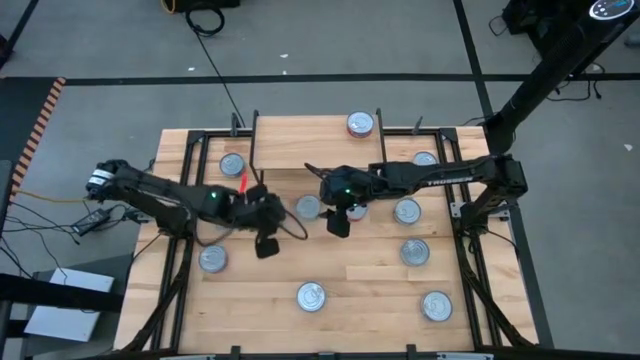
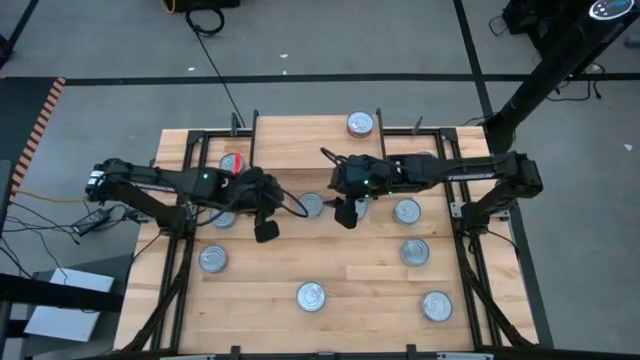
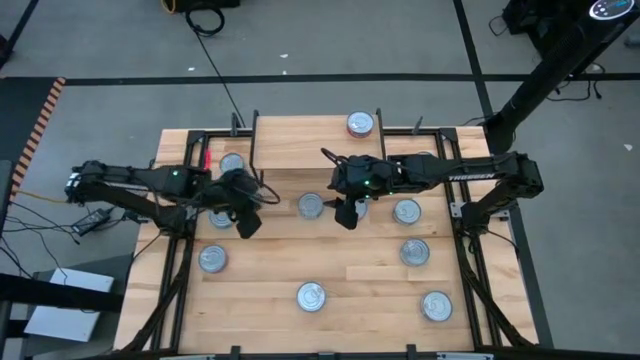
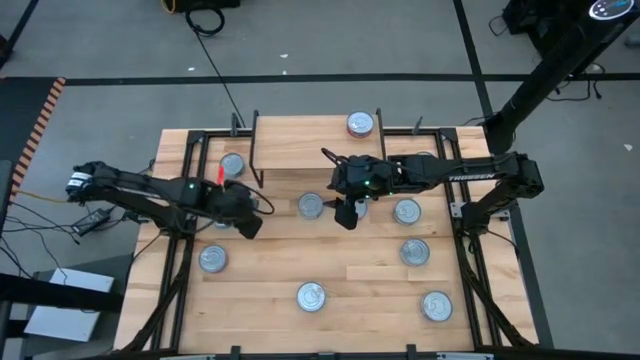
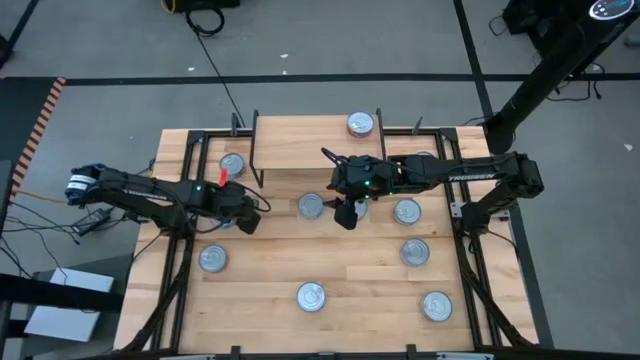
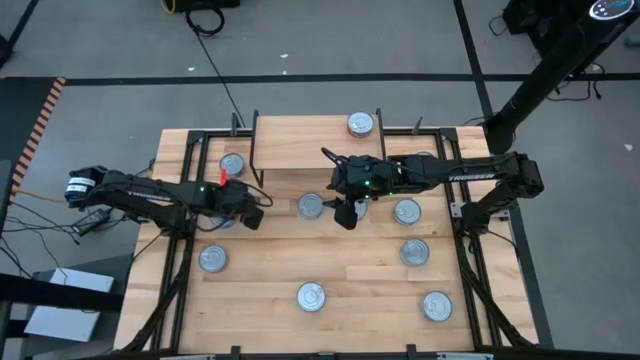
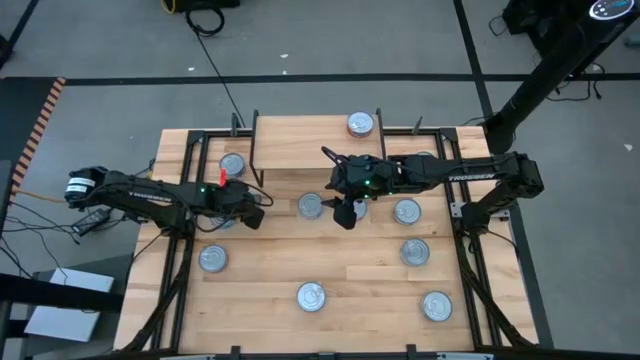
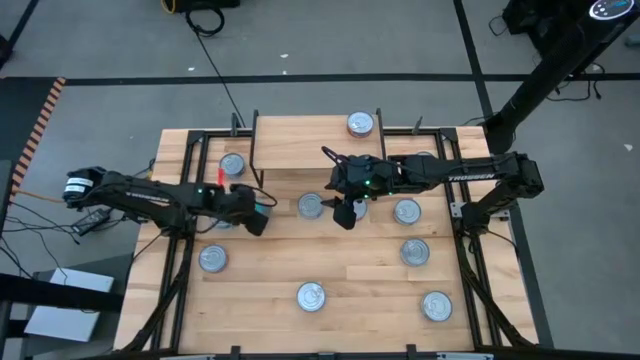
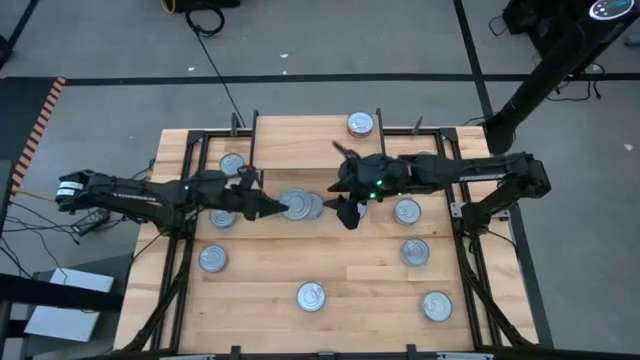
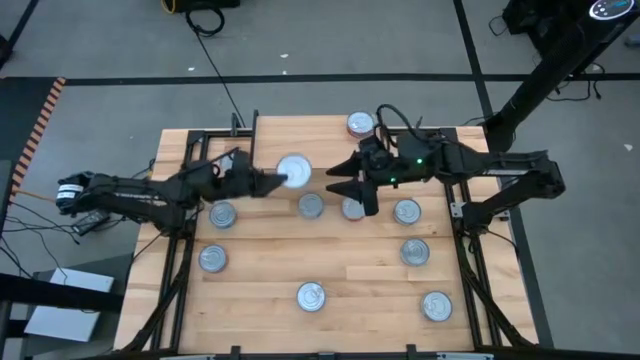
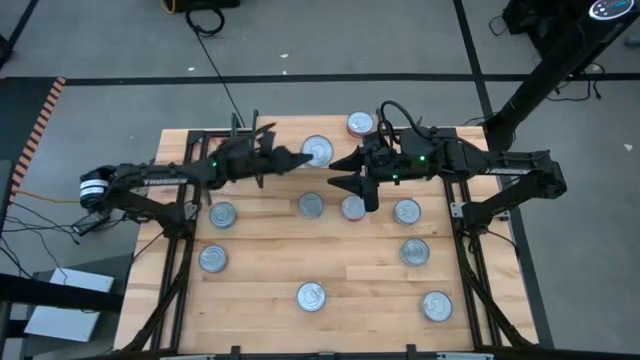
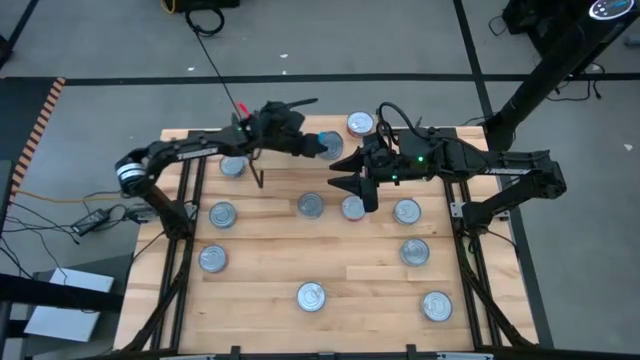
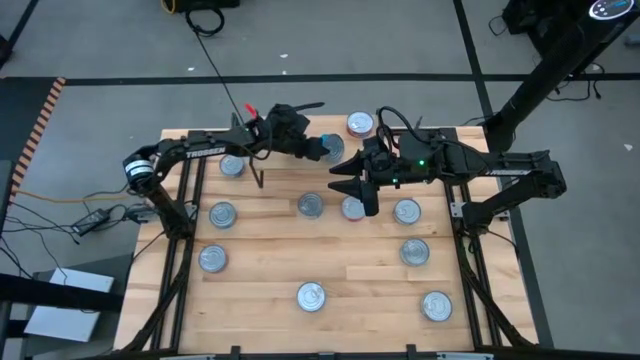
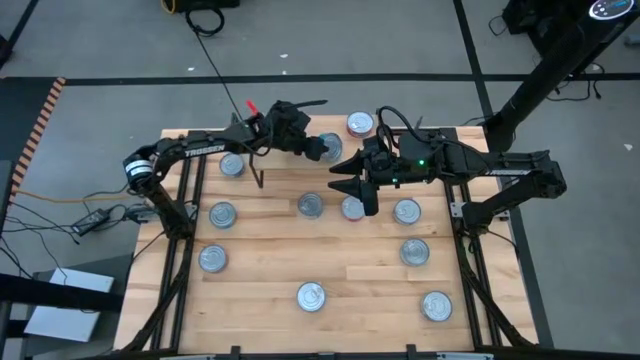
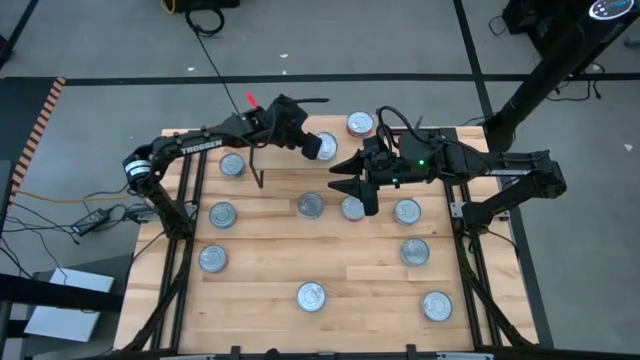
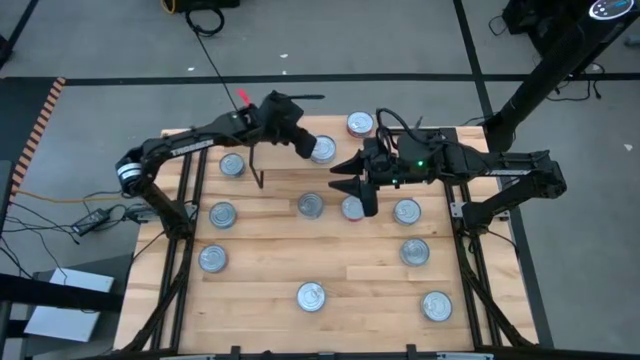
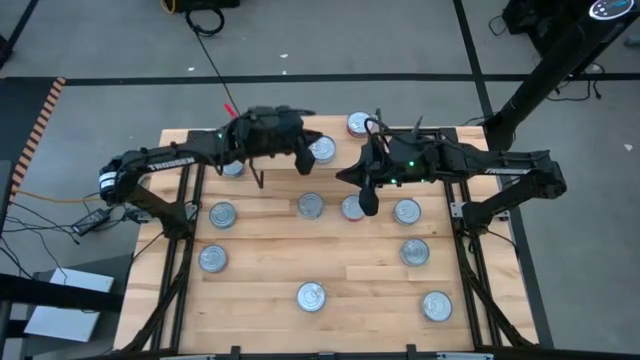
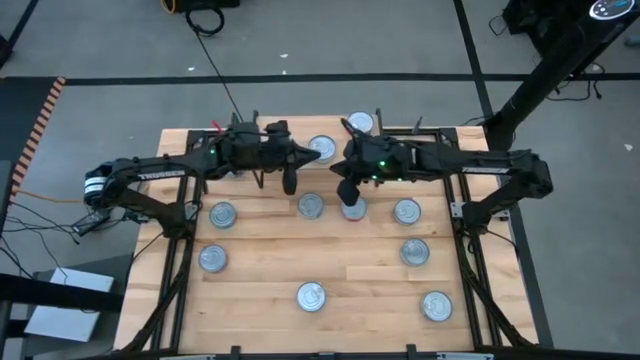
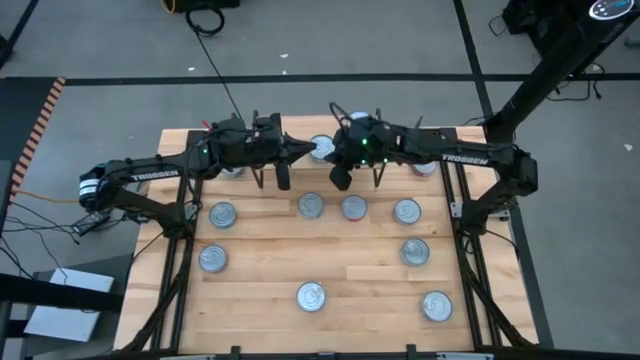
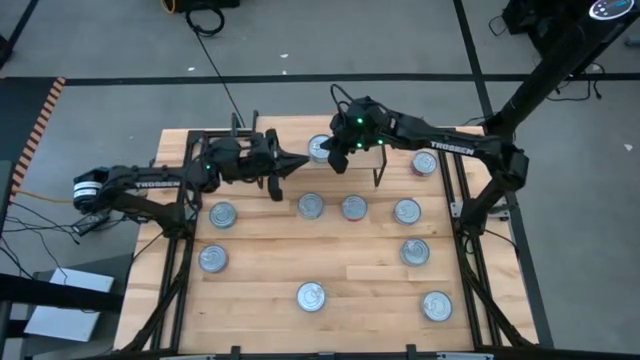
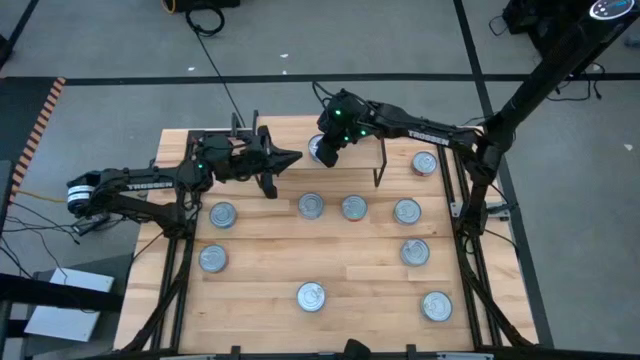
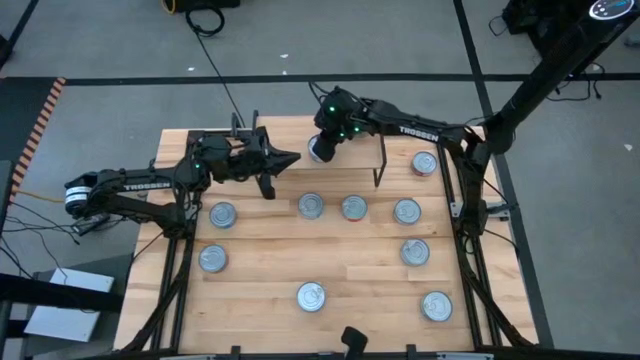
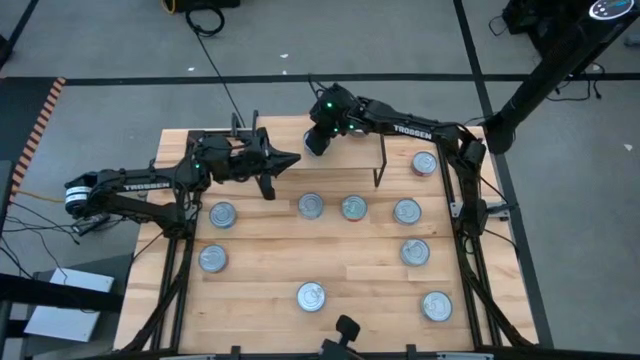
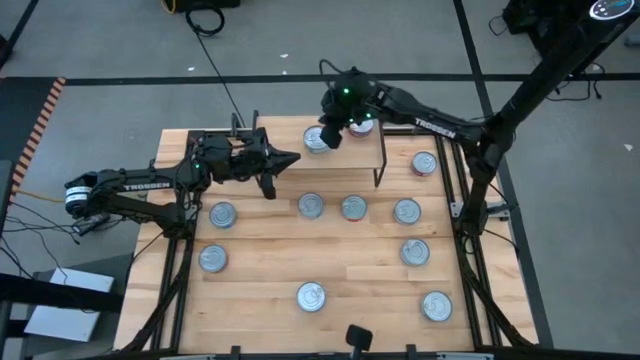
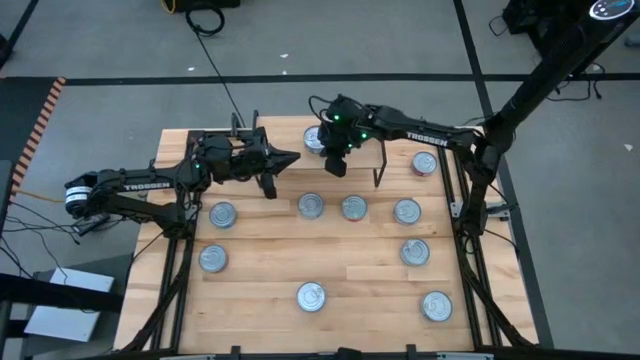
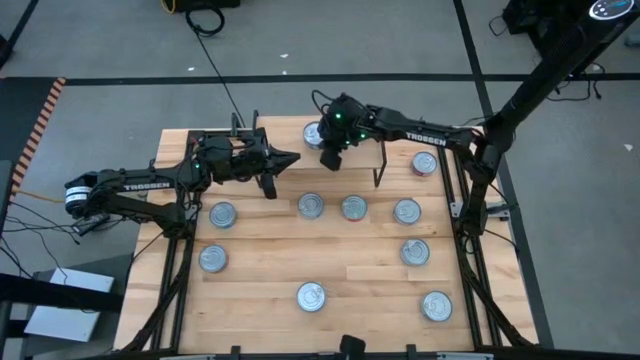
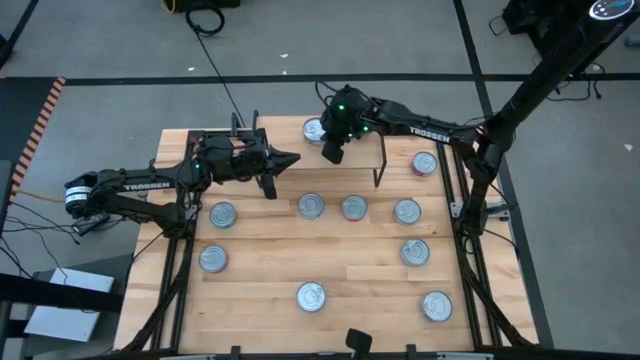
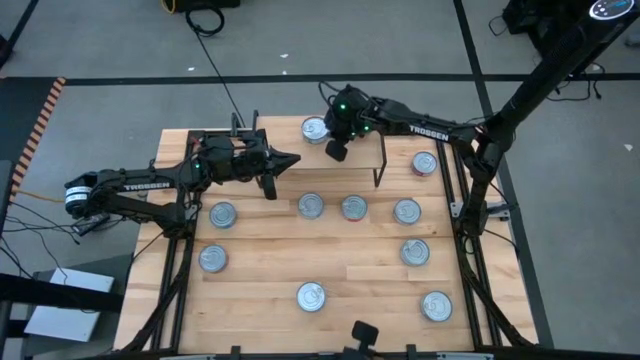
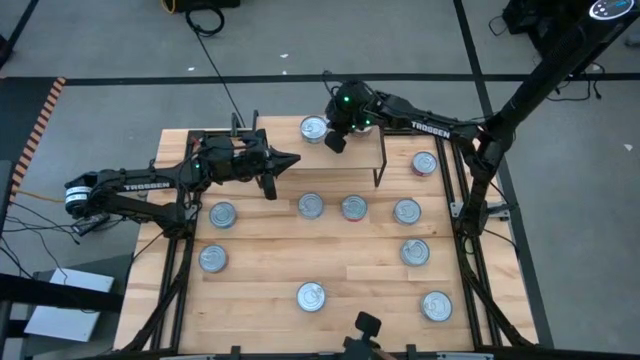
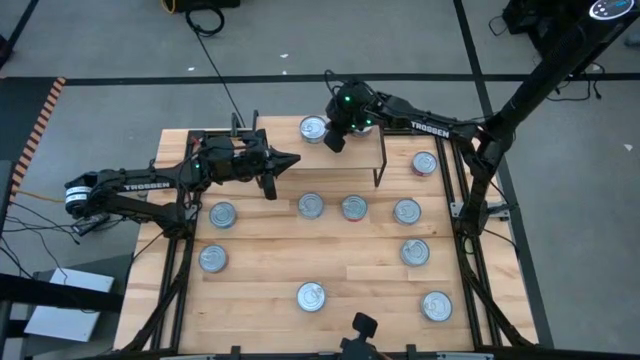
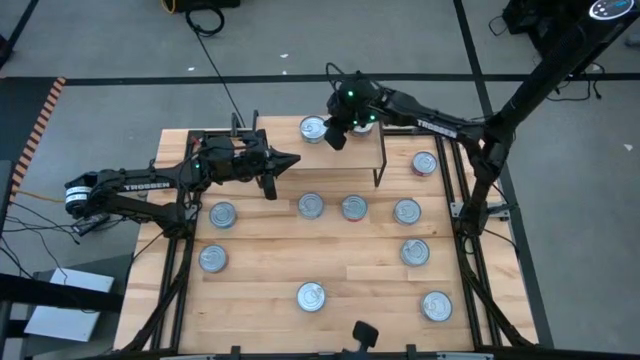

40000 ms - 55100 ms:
Task: Stack canned seafood by type on shelf
Put the yellow-blue tuna can on the shelf

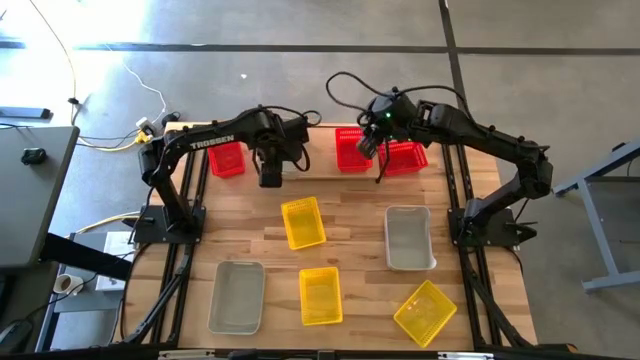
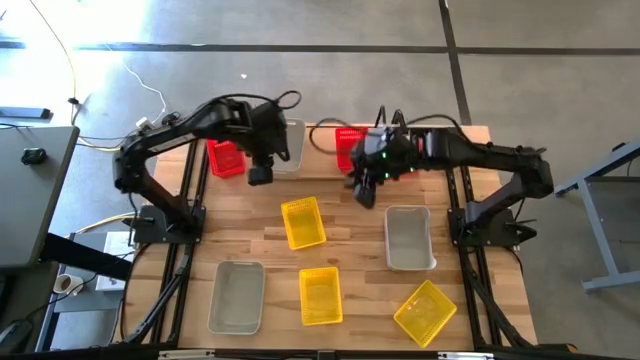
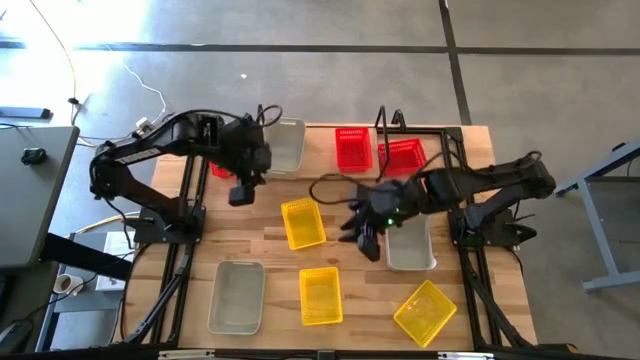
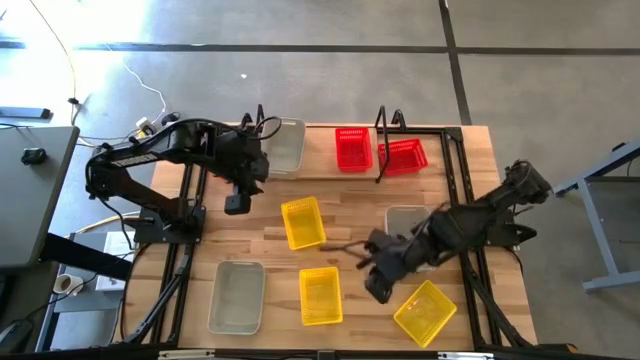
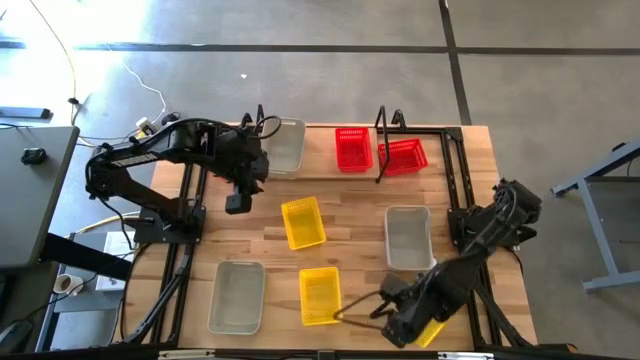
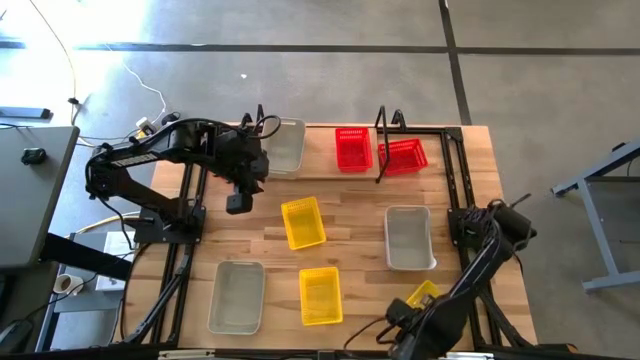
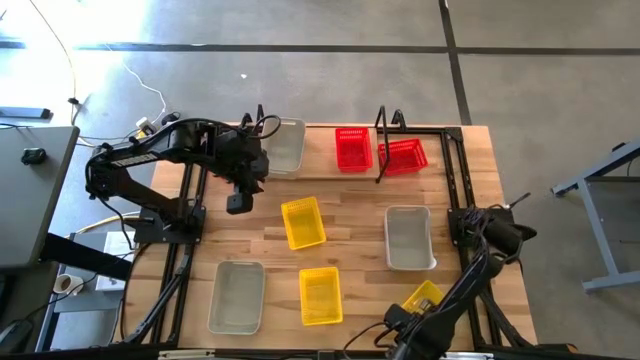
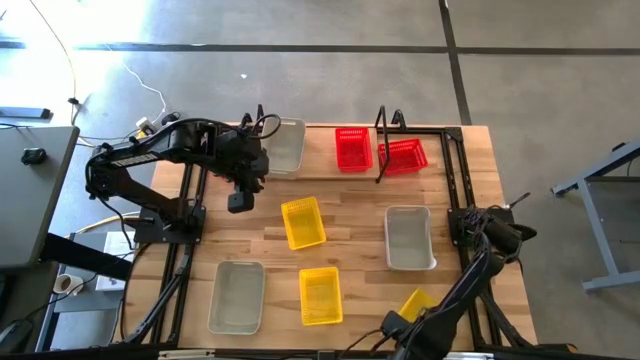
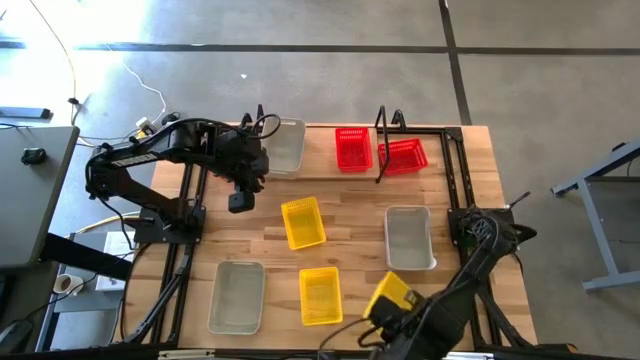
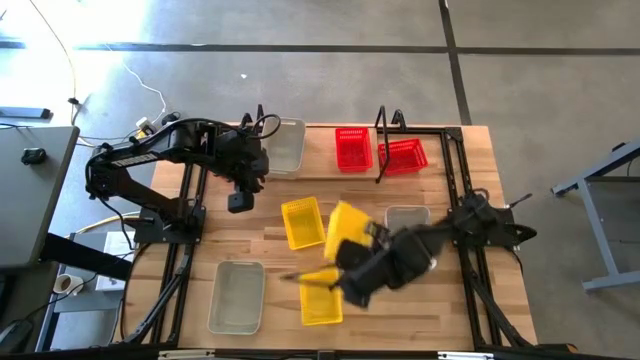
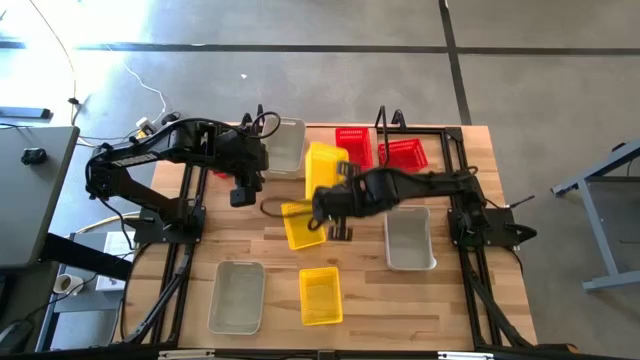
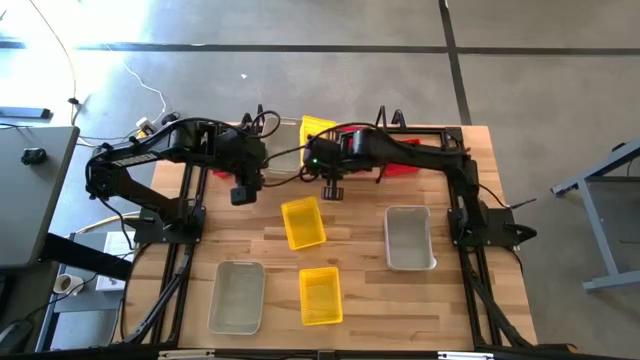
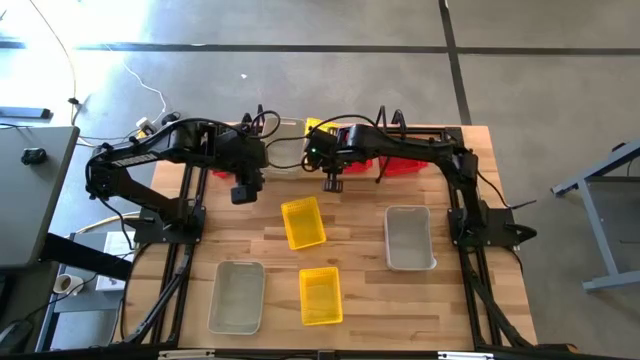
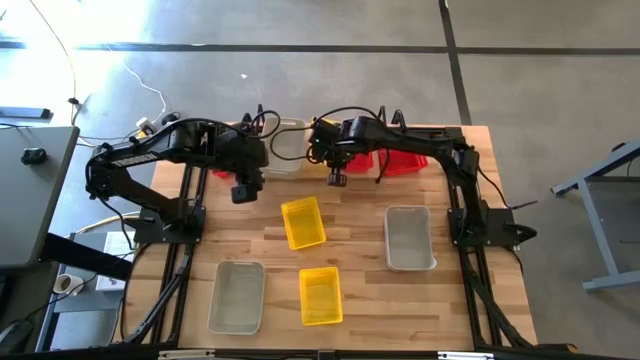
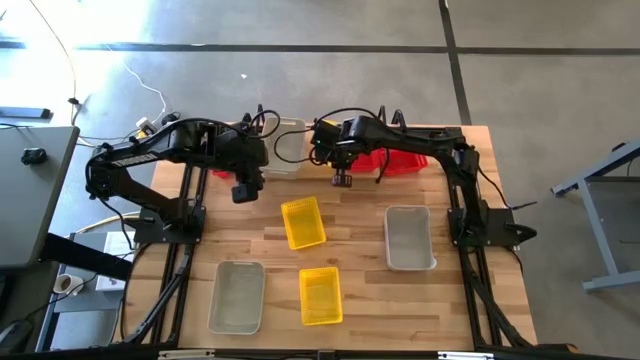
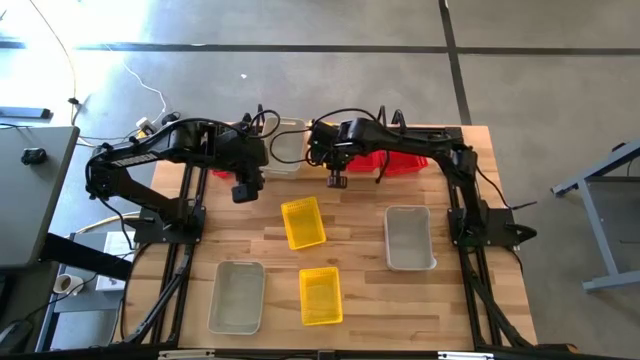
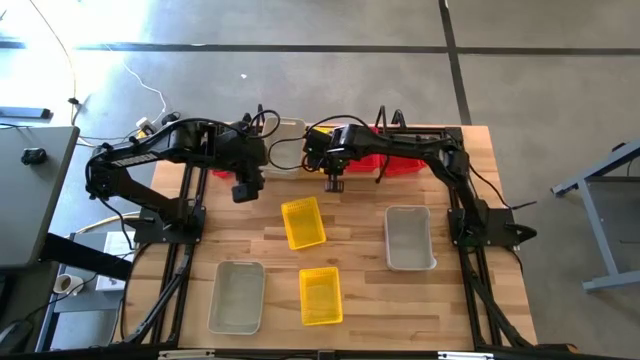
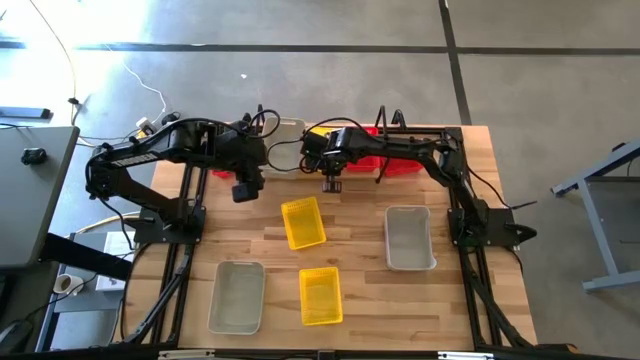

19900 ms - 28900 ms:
Task: Stack baskets on shelf by color
Put the bottom right yellow bin on the shelf
